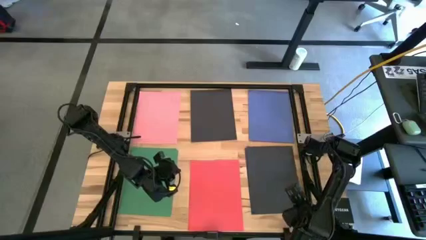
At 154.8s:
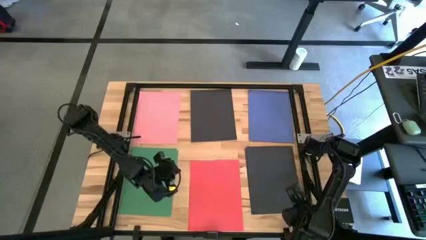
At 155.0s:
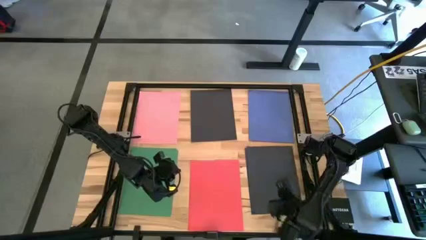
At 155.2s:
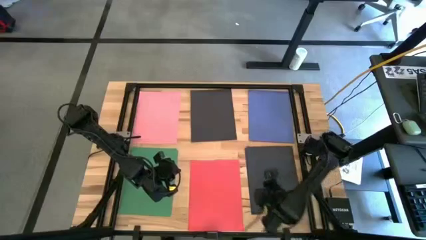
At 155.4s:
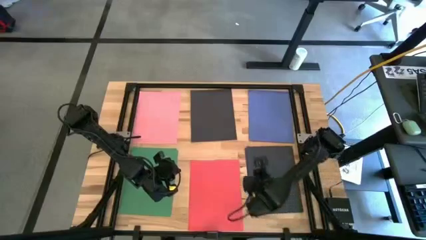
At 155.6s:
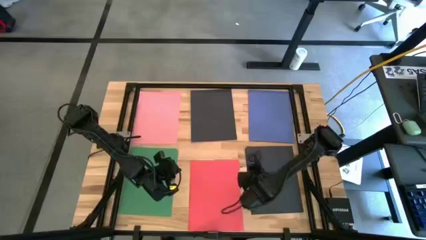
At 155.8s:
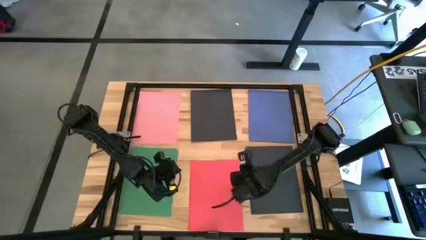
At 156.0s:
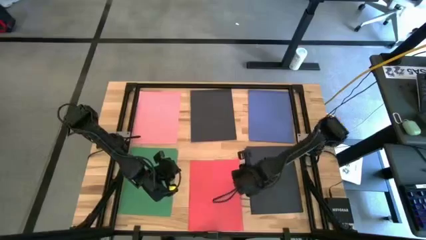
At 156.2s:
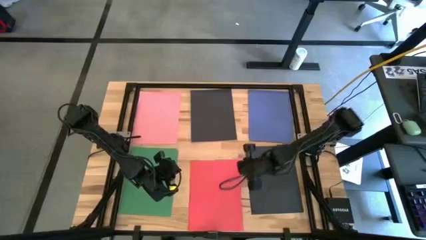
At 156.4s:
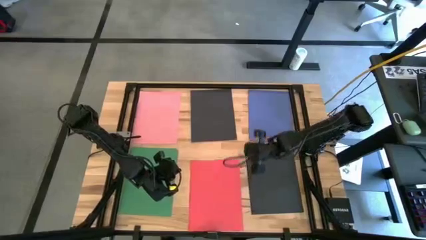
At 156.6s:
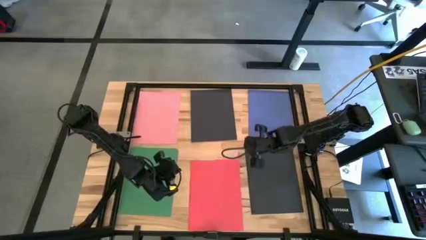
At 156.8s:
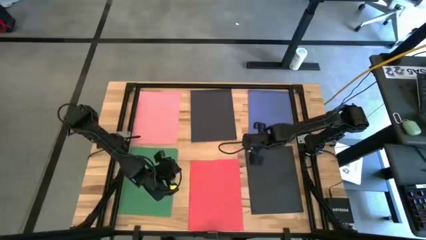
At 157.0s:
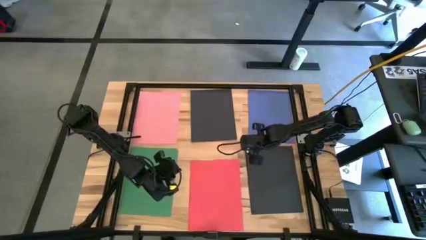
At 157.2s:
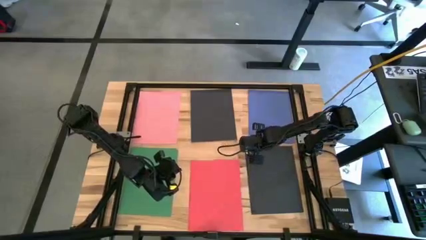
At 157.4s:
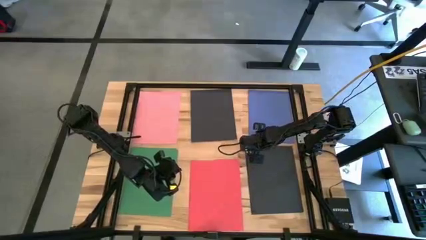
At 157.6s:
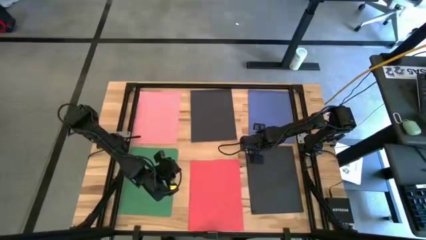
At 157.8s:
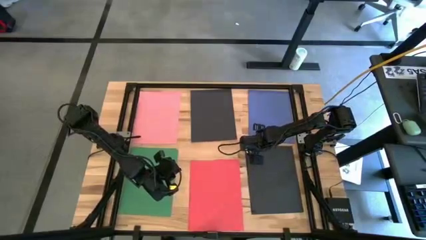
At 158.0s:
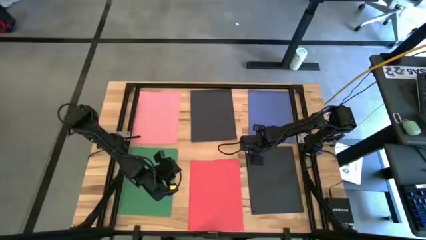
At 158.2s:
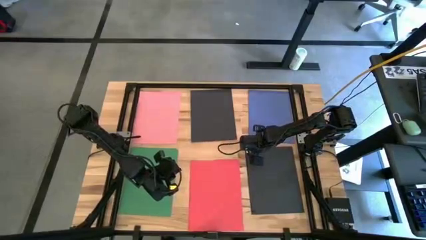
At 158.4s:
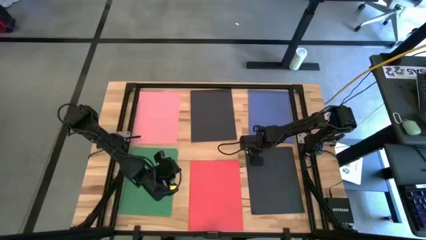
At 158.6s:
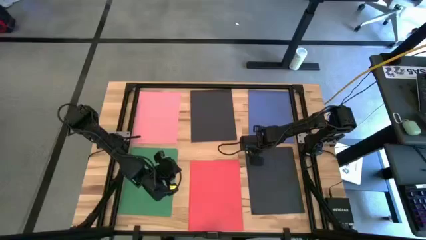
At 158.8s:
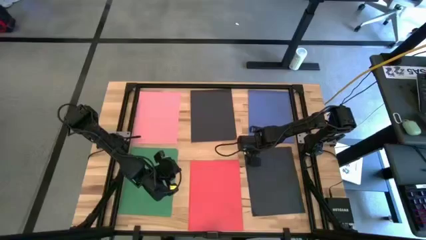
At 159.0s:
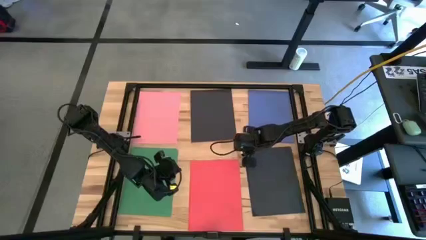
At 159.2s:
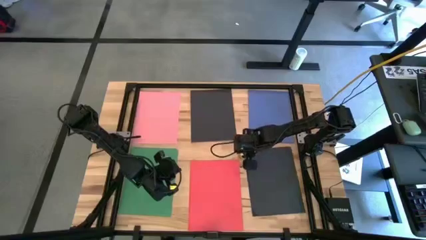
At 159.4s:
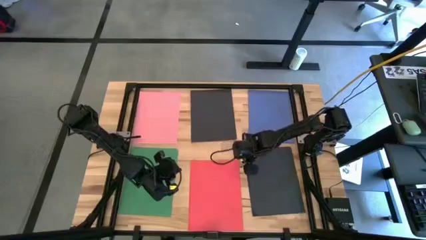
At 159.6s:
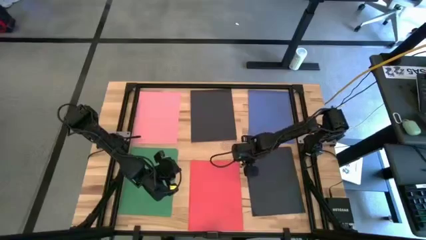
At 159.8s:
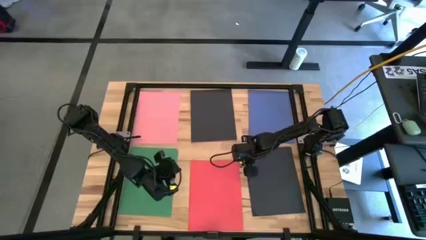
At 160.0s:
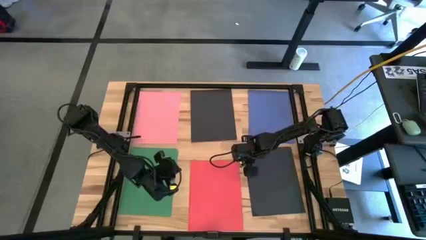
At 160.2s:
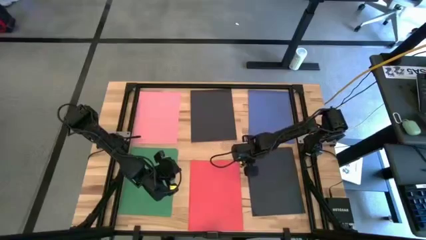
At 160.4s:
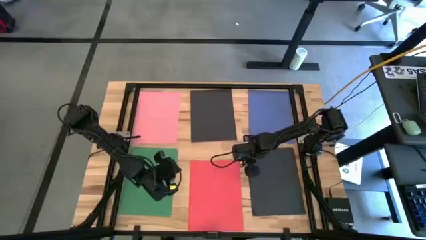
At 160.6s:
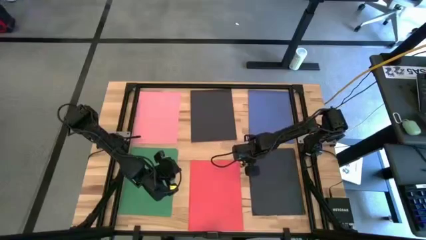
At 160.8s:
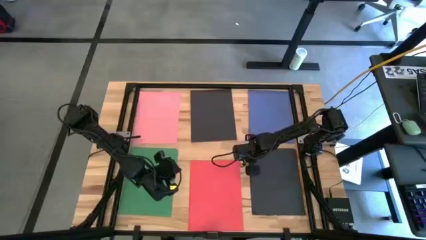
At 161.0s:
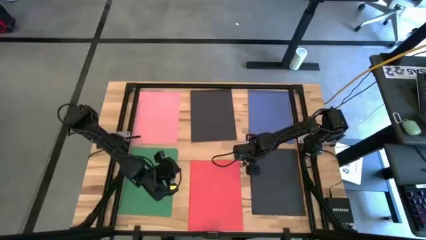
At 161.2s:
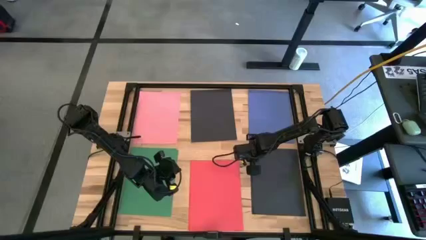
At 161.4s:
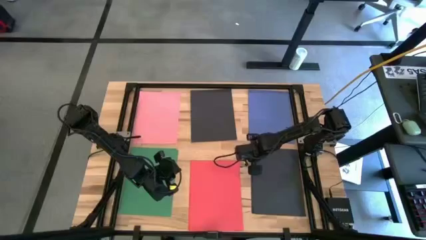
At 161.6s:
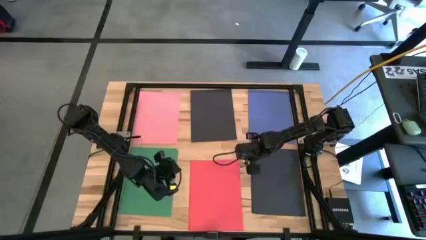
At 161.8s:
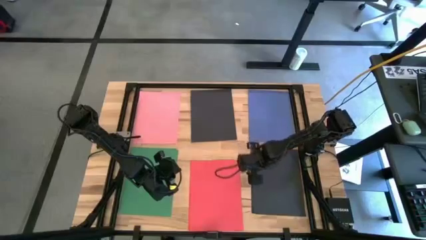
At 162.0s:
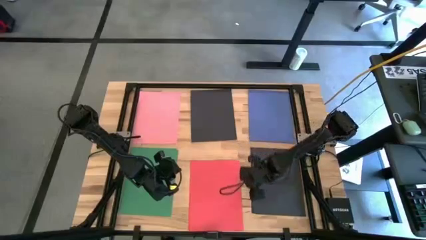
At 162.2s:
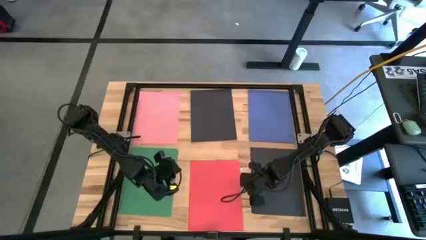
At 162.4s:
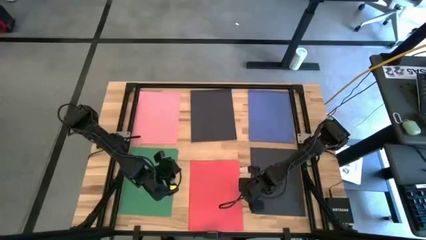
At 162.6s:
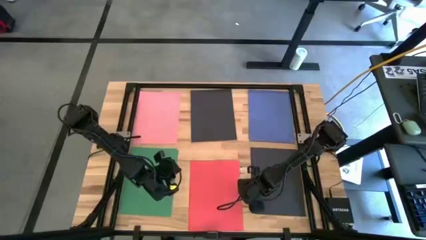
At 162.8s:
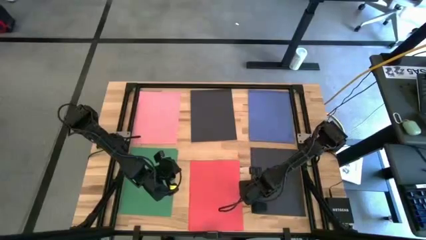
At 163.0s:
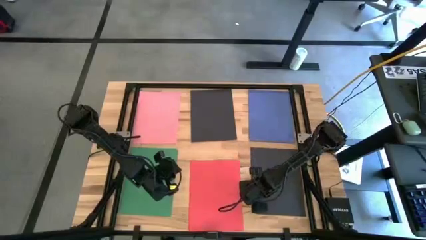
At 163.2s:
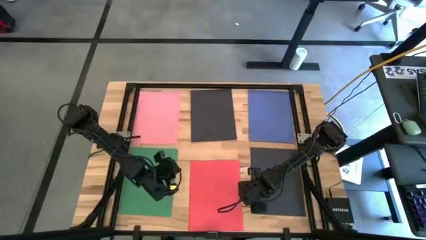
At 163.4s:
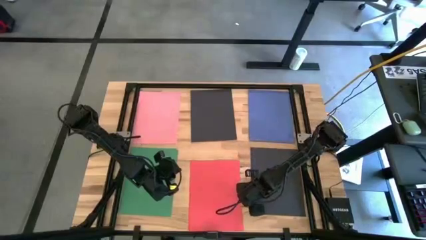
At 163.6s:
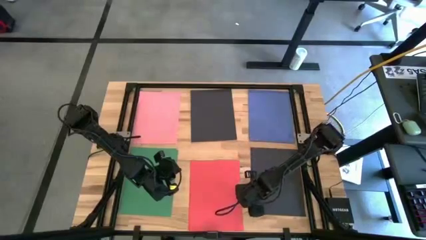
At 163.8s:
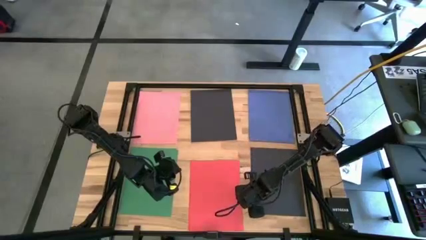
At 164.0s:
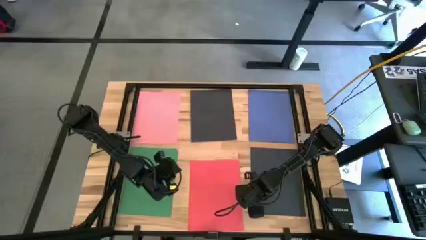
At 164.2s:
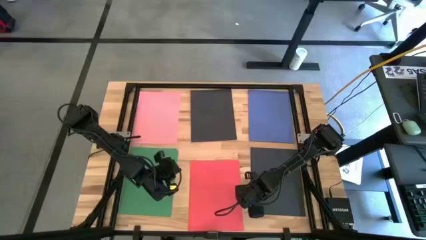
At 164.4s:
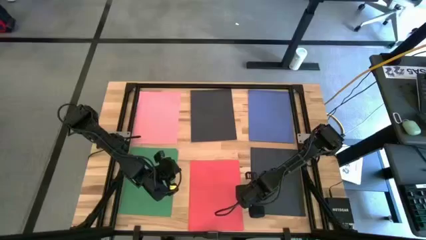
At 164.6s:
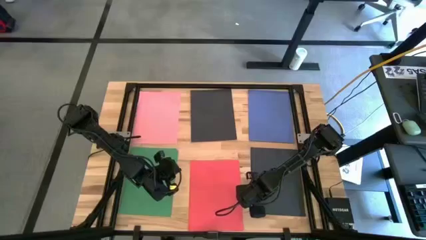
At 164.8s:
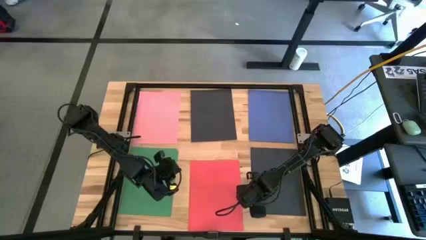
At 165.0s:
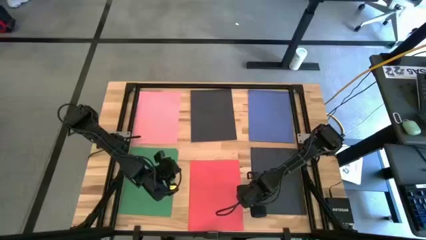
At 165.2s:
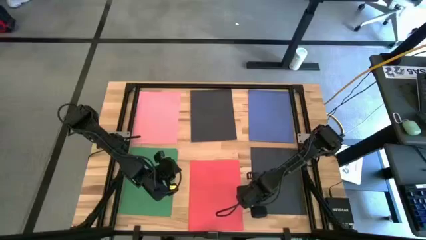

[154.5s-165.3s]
Task: Organize paper
Adjust the stacked black papers on the table

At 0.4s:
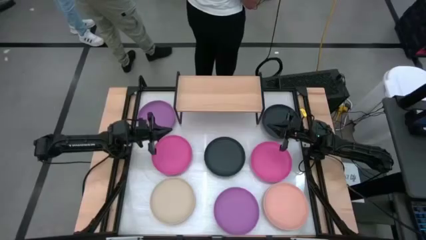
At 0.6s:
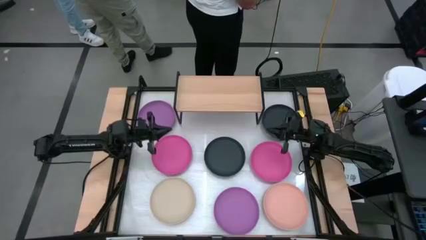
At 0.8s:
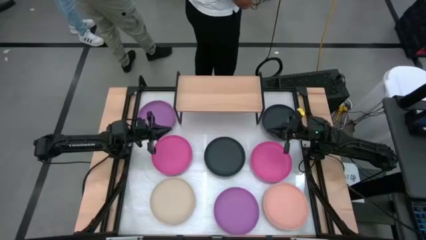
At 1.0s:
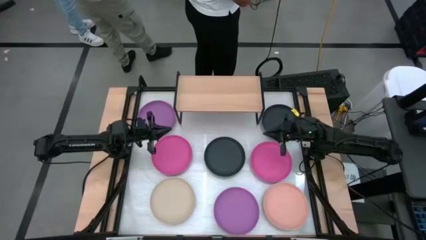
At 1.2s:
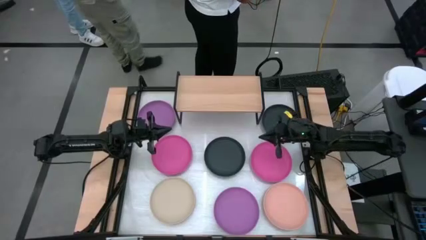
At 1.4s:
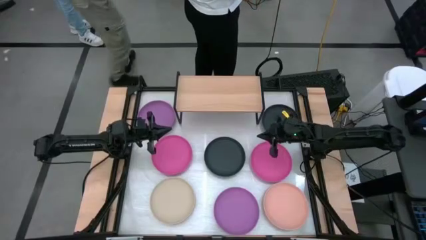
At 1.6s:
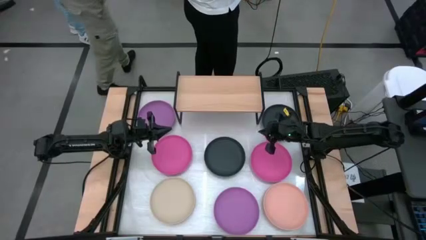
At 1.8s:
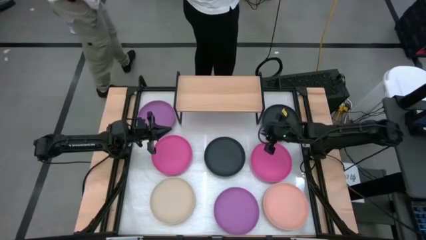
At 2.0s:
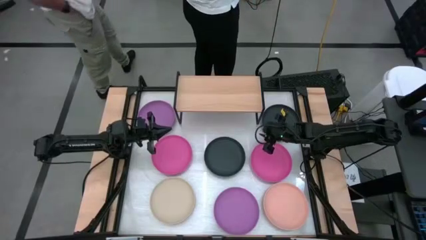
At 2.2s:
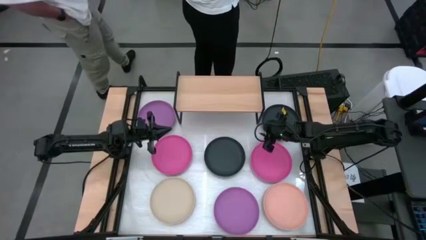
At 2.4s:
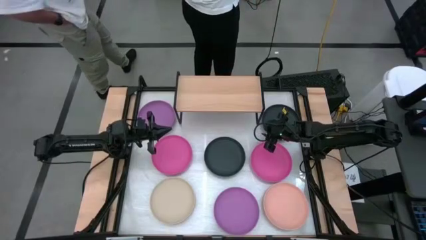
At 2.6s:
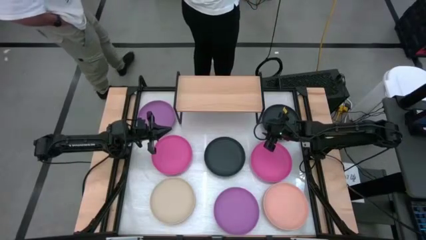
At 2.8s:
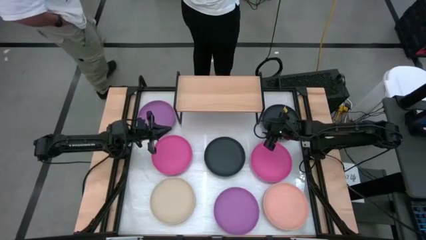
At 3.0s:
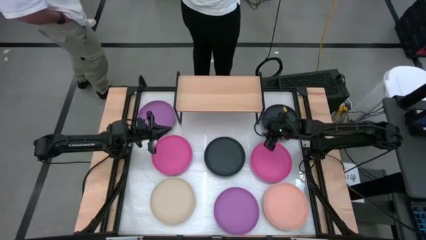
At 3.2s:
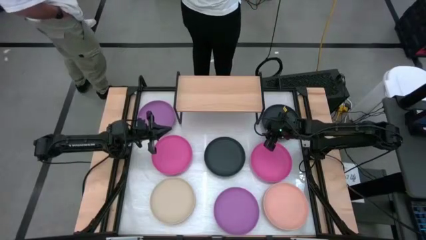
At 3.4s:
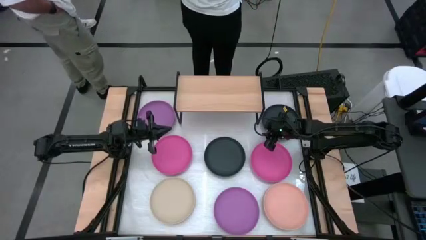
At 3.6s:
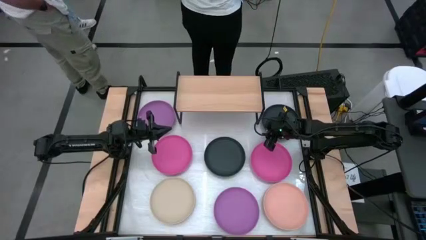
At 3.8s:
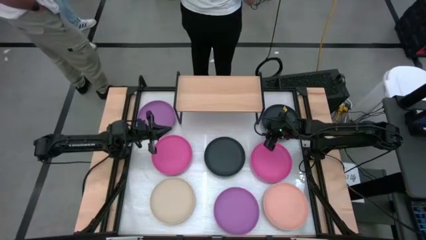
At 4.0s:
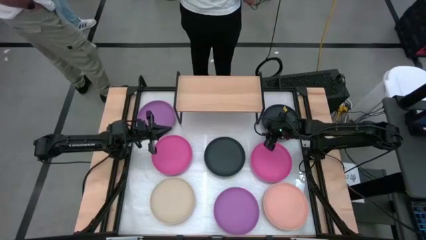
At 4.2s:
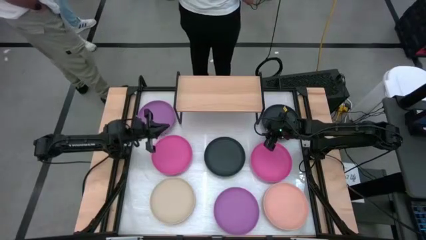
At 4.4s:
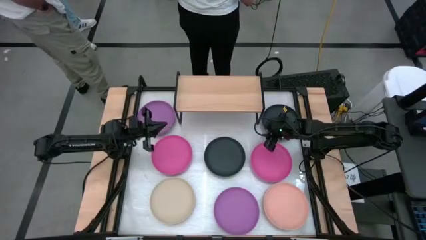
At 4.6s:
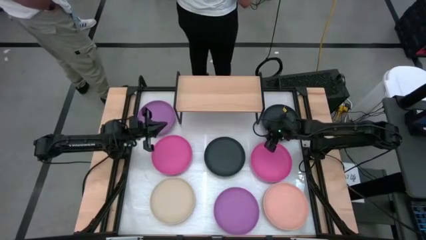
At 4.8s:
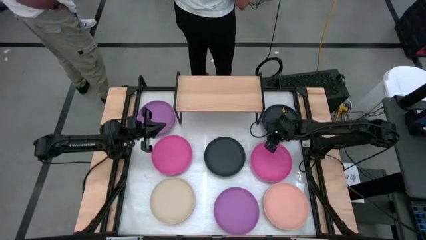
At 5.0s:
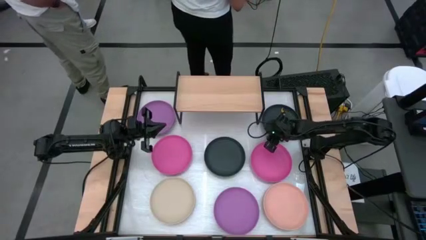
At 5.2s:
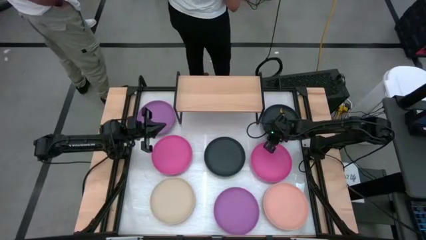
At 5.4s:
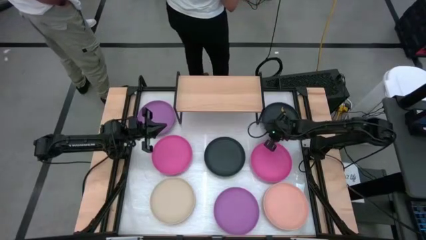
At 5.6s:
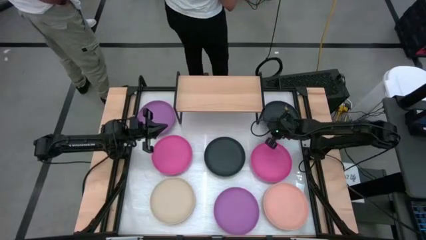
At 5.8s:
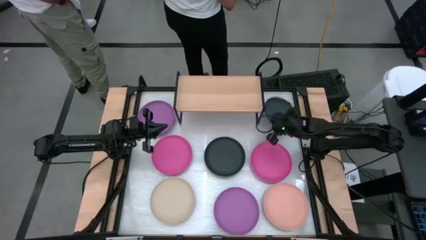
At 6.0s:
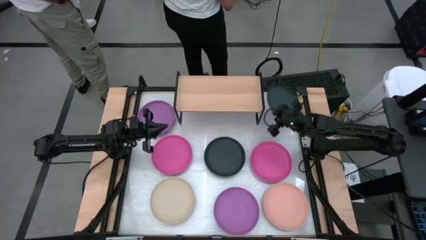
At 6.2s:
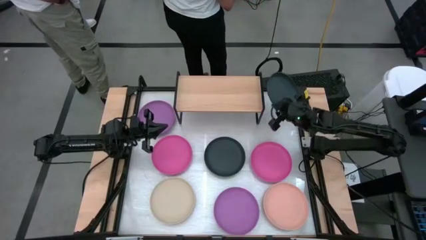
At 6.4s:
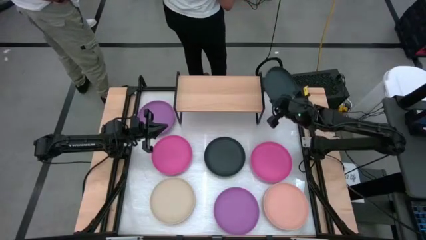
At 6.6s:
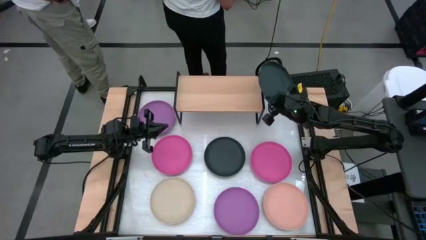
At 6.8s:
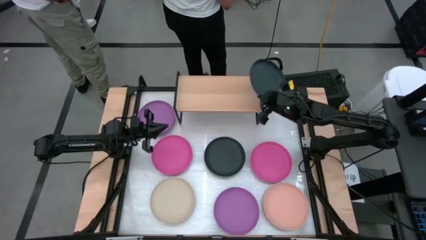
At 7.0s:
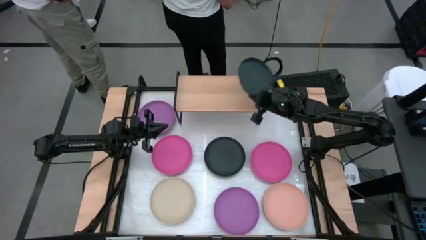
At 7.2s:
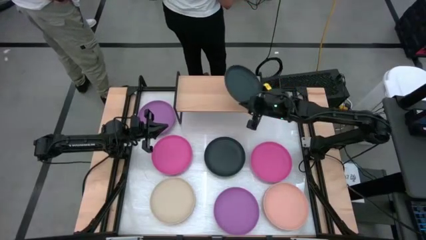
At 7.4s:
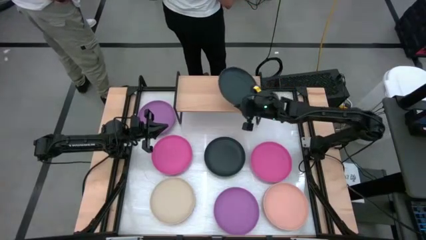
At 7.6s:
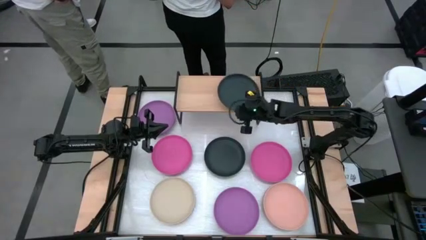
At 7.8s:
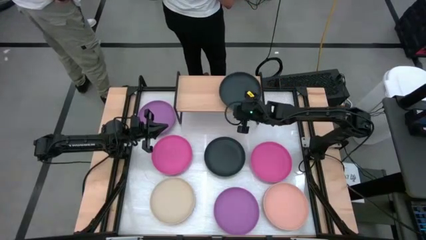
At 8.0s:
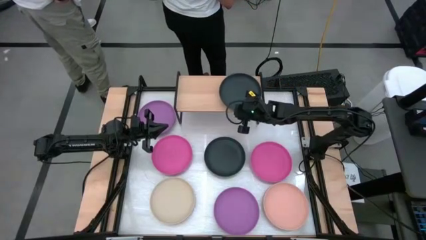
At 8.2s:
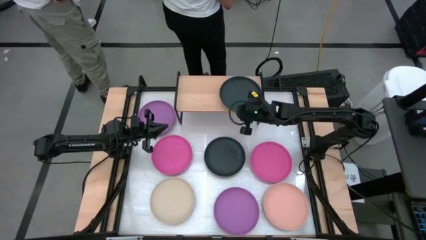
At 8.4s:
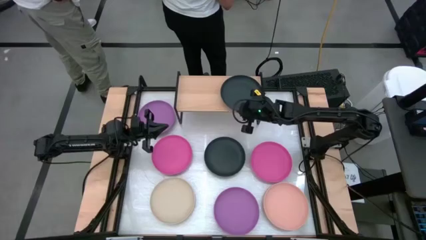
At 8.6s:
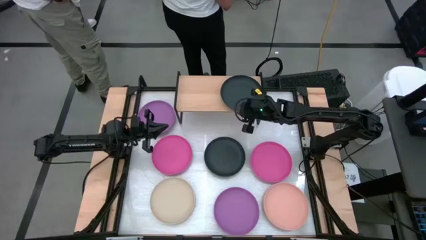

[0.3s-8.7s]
Task: Place and stack plates onto a shelf
Put the right black plate on the shelf
